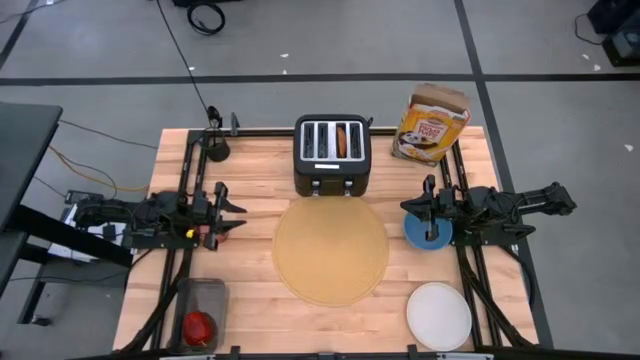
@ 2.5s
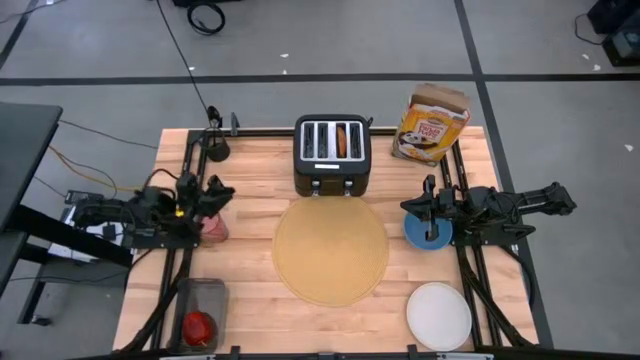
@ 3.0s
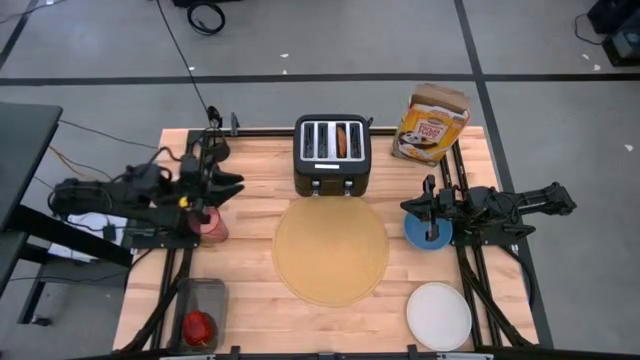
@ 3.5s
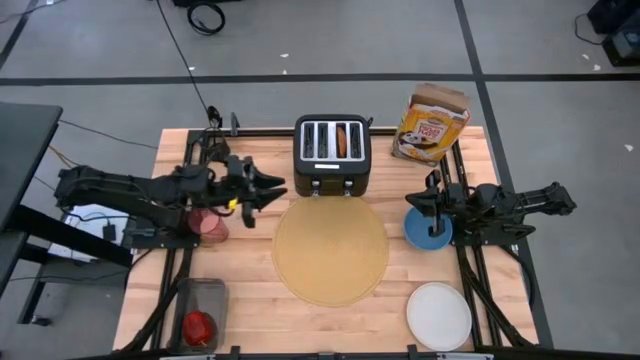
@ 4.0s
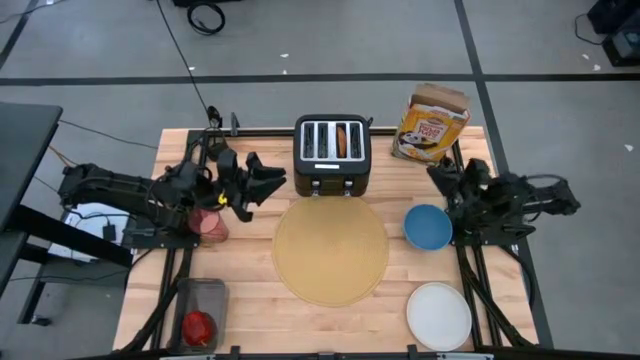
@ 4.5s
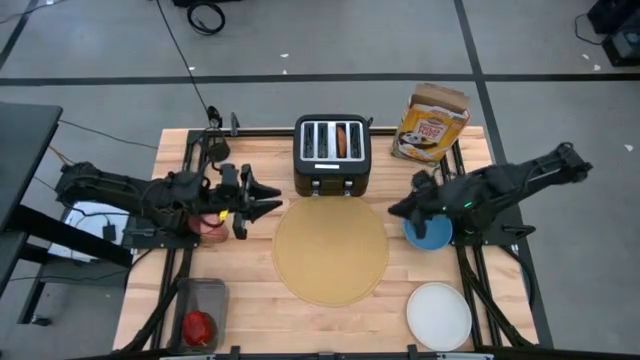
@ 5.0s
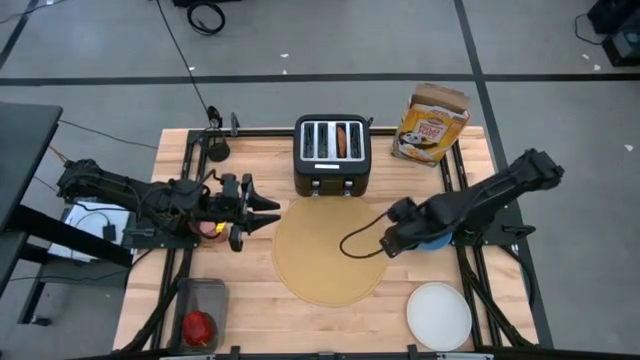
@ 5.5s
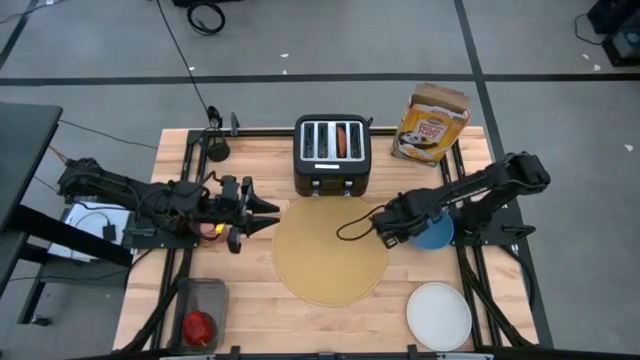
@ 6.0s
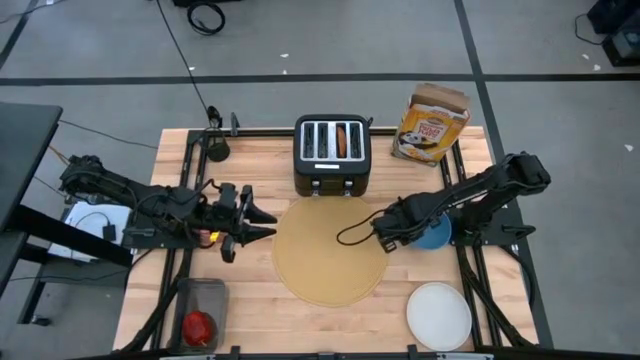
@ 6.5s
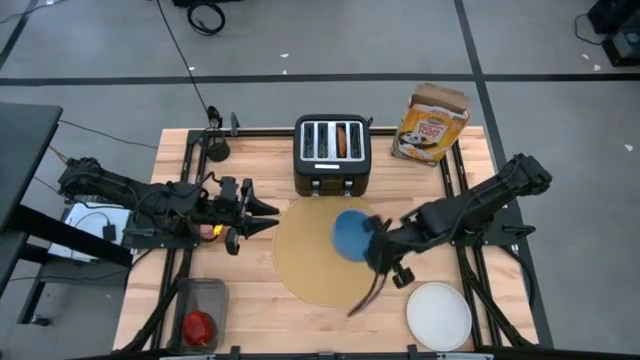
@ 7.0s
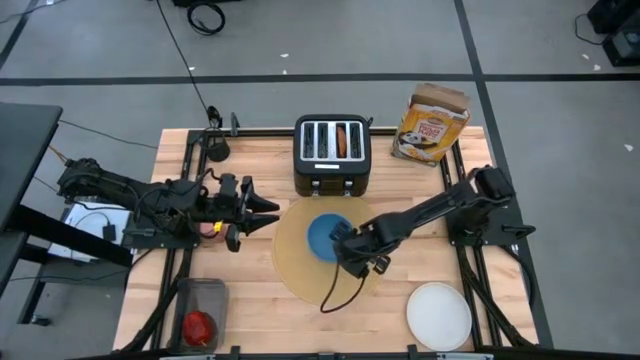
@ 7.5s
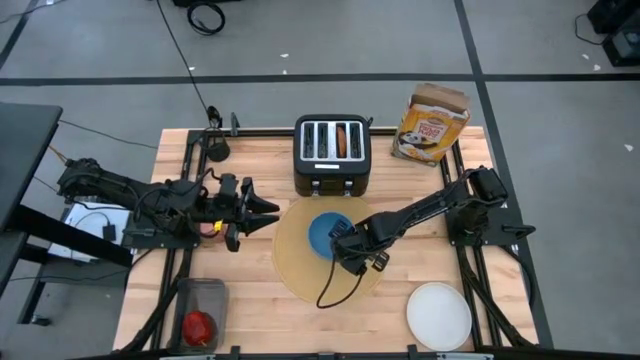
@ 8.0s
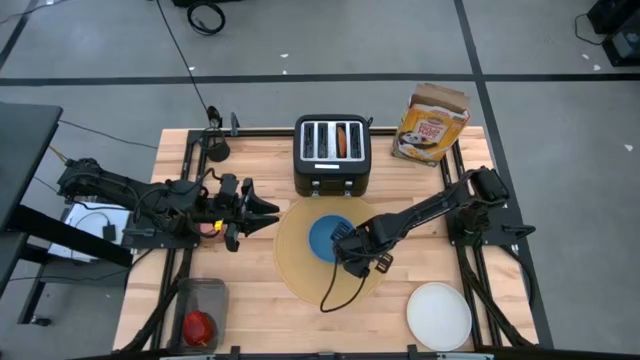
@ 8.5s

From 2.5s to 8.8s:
Task: Arrange a breakfast setting
Put the blue bowl on the yellow tablemat

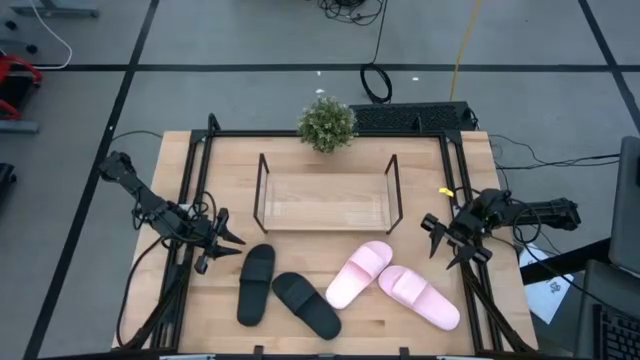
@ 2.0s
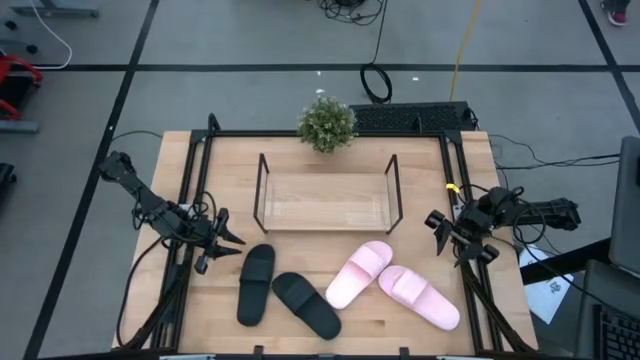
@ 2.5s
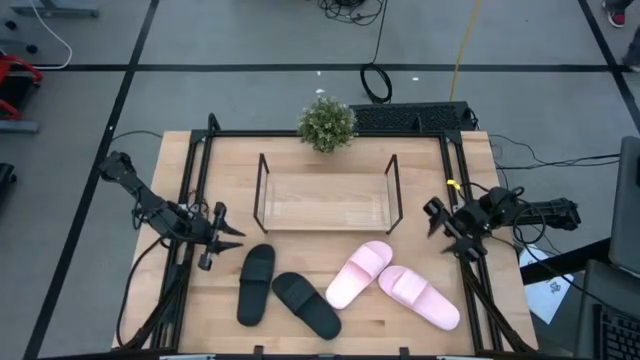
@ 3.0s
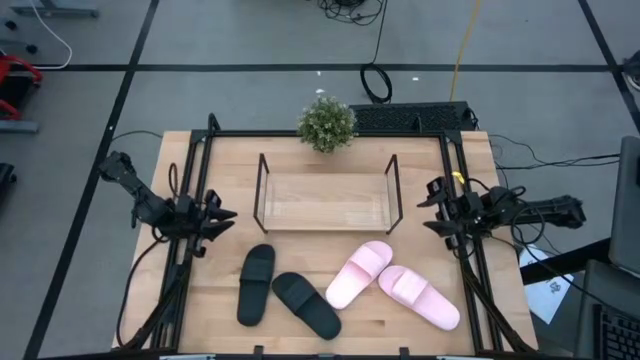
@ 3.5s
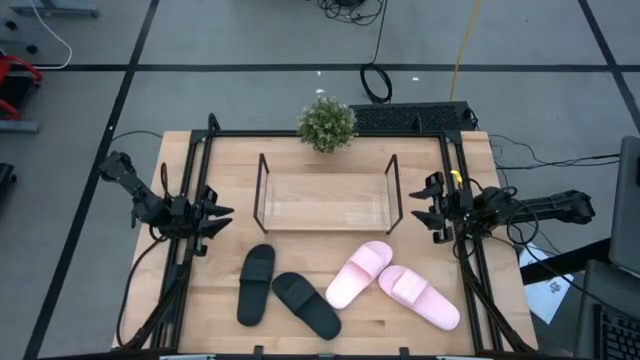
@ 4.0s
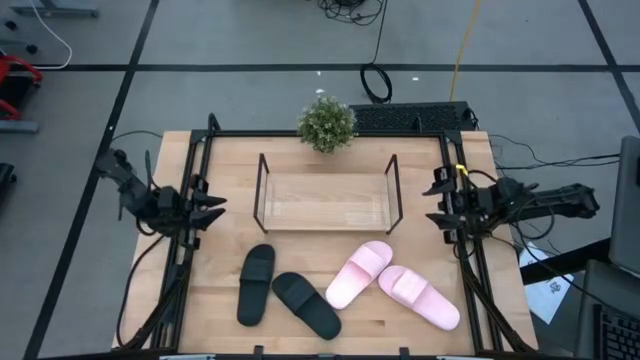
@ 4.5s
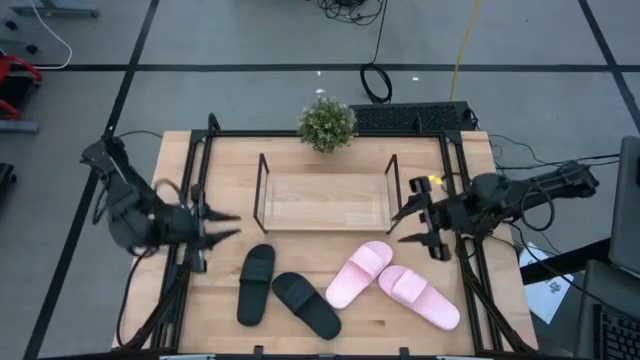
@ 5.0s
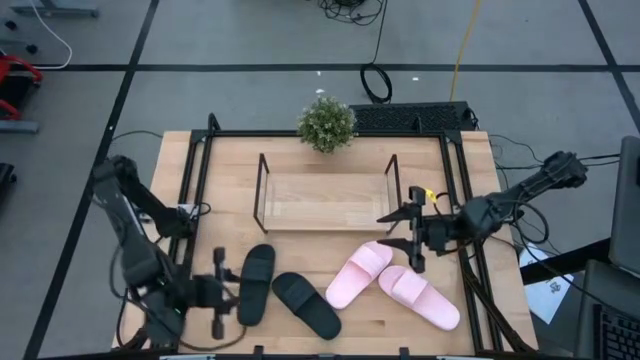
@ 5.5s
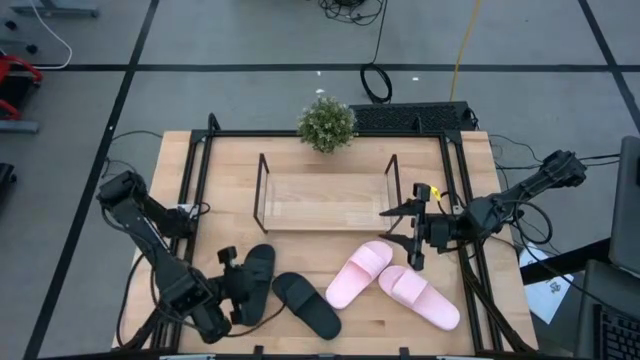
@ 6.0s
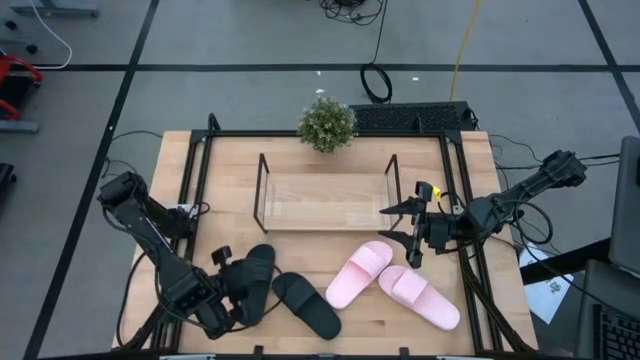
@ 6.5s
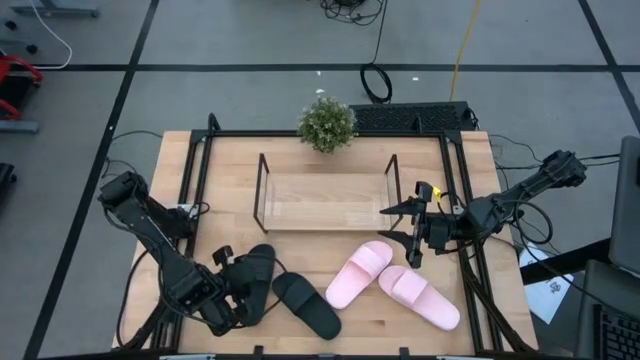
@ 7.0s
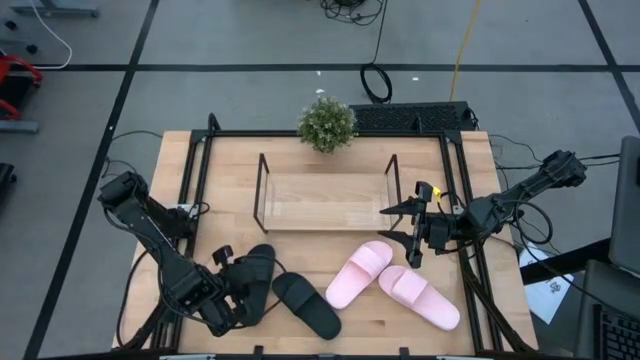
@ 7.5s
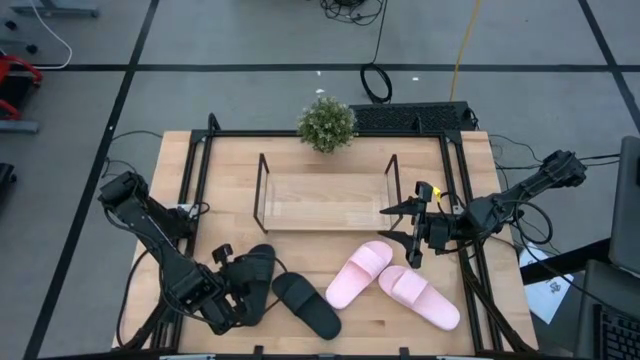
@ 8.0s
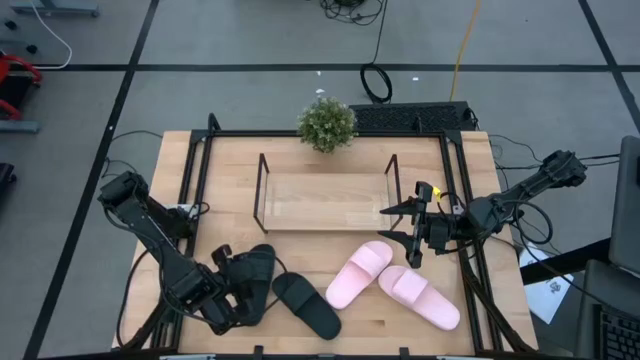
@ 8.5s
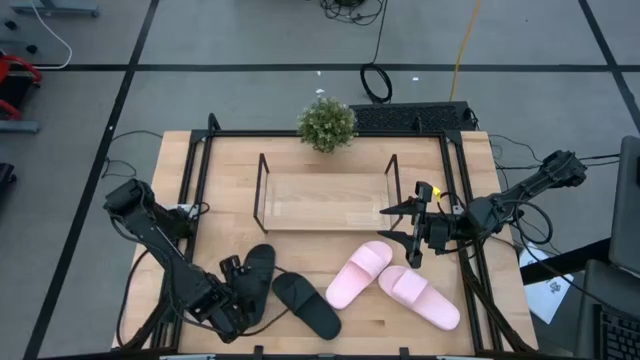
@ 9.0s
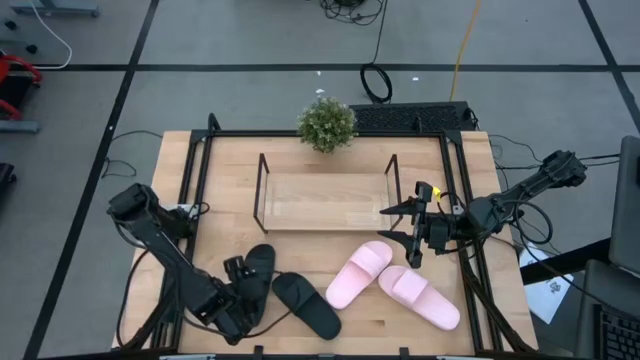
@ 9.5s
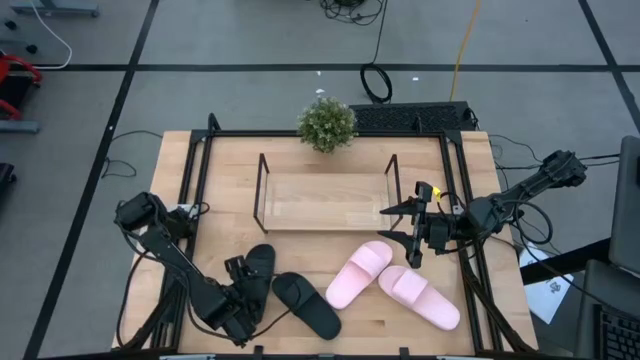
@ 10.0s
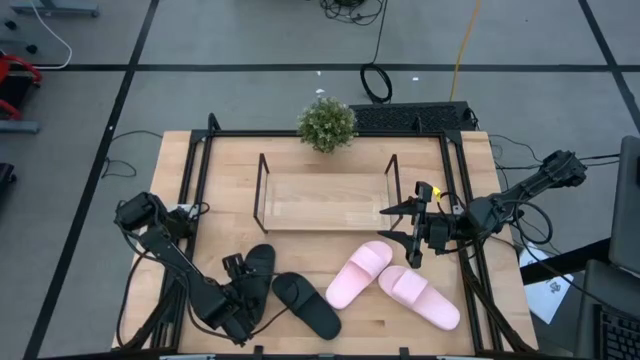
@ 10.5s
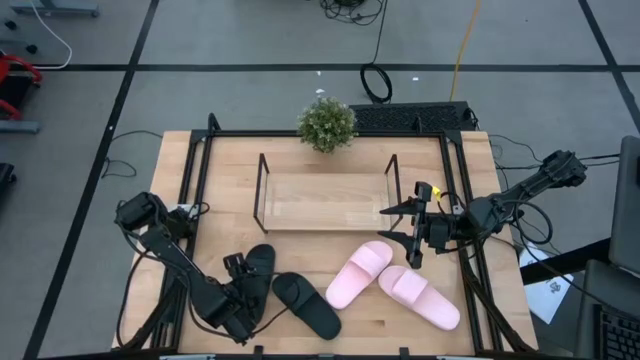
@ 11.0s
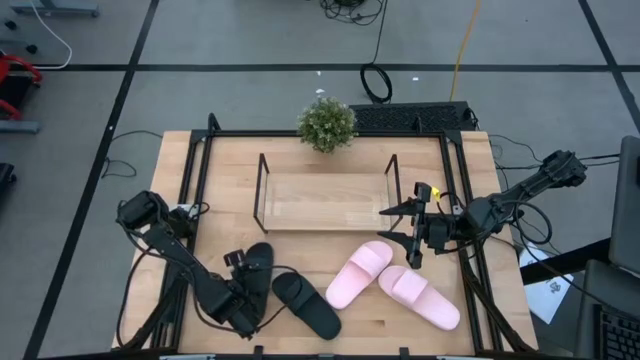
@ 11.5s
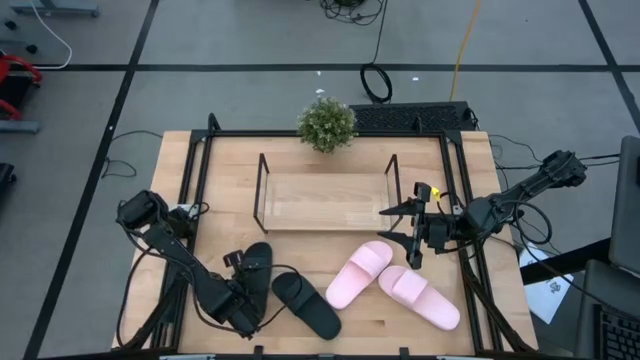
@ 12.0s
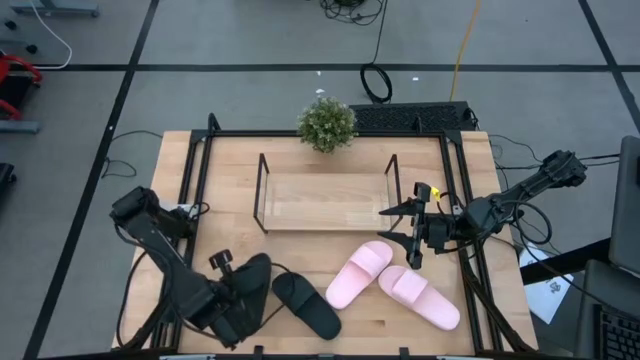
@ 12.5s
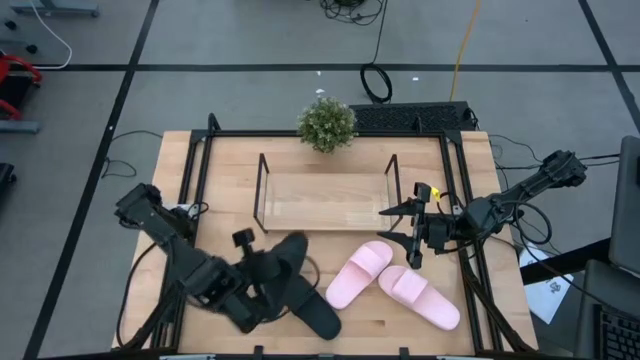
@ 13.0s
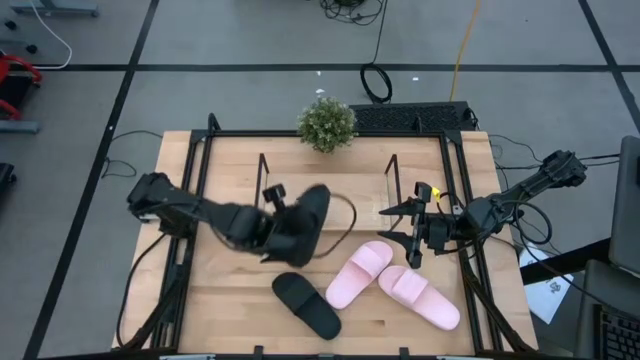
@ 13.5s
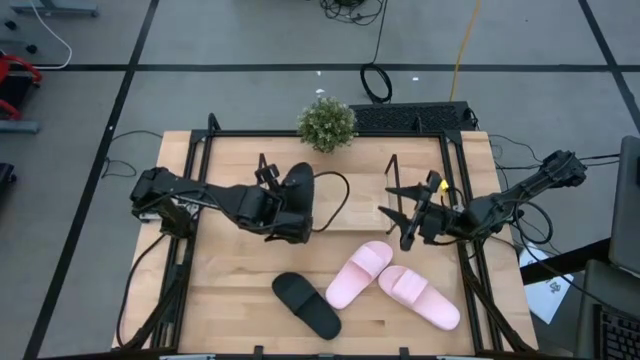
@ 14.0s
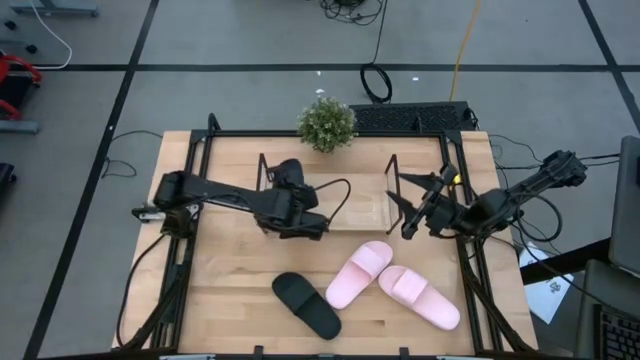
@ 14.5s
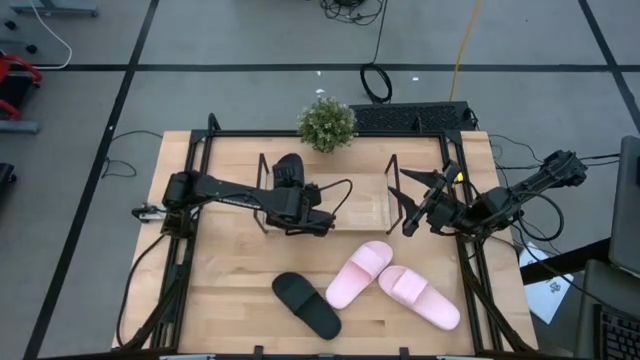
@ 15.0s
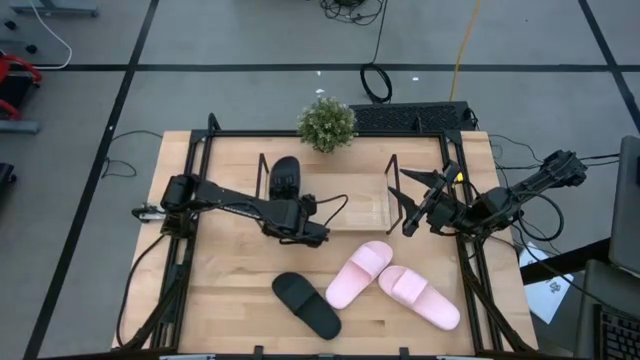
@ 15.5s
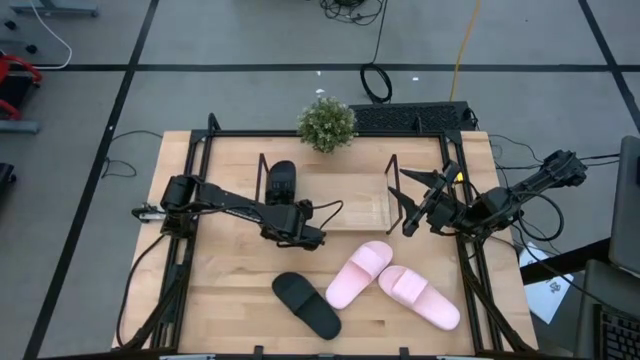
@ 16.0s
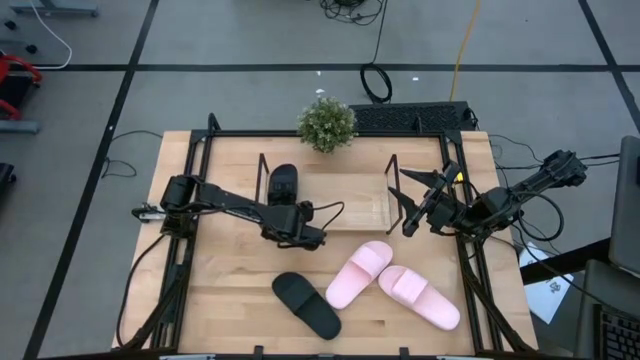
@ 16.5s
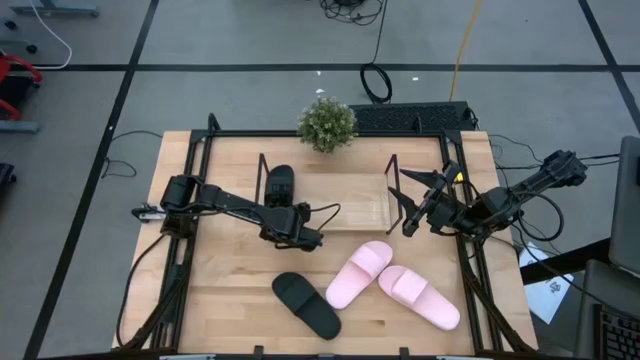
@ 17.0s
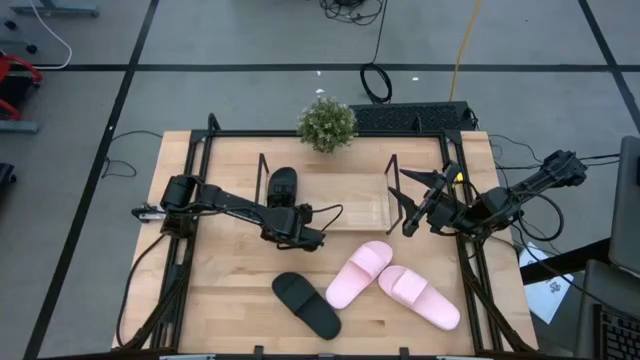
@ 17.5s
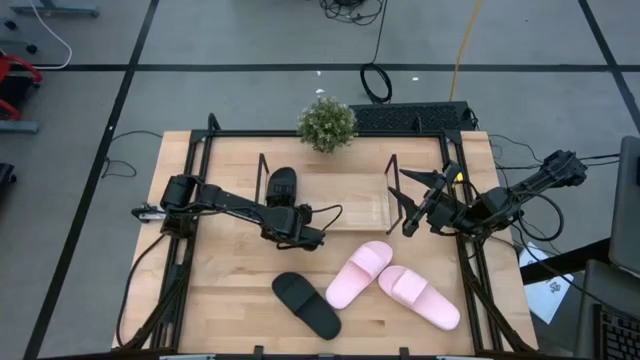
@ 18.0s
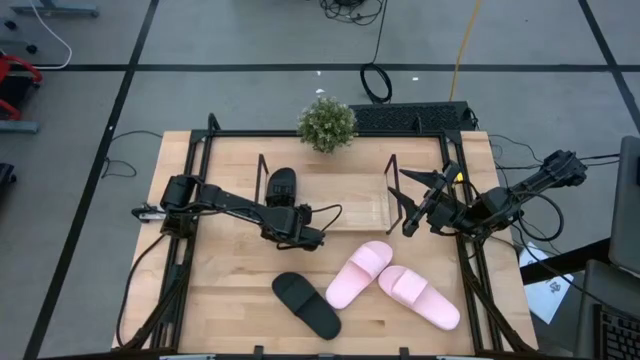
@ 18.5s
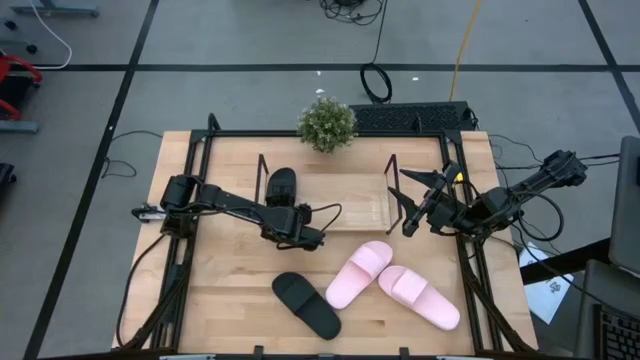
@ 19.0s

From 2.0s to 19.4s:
Task: Pick and place slides into the shelf
Put the left black slide on the shelf
